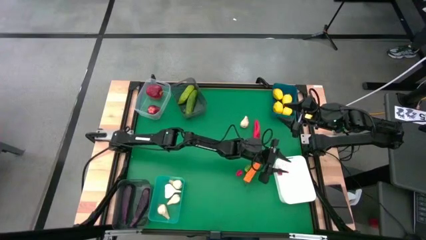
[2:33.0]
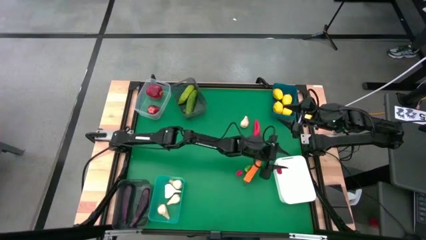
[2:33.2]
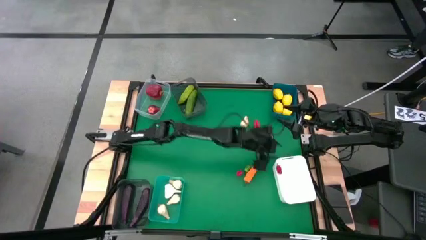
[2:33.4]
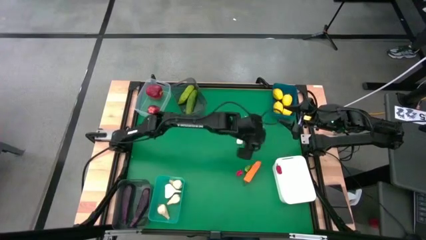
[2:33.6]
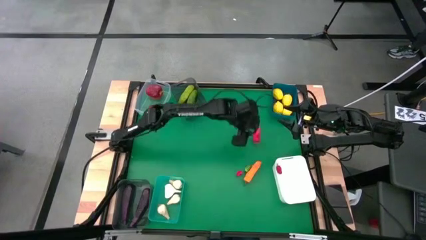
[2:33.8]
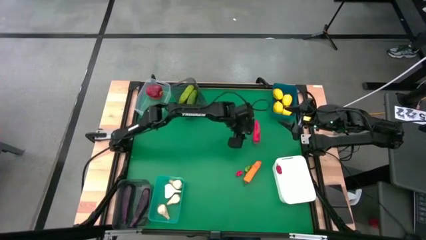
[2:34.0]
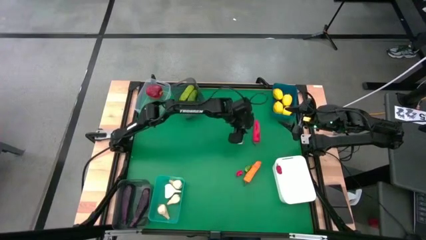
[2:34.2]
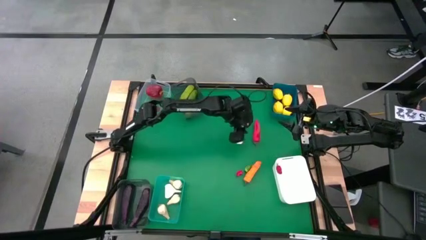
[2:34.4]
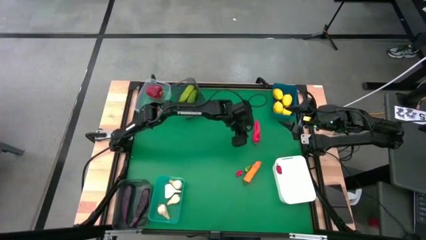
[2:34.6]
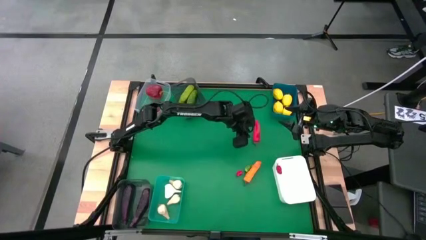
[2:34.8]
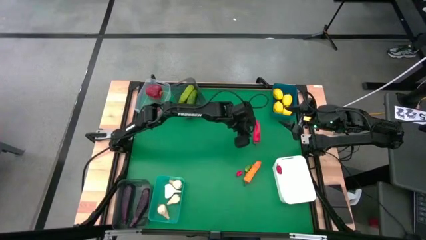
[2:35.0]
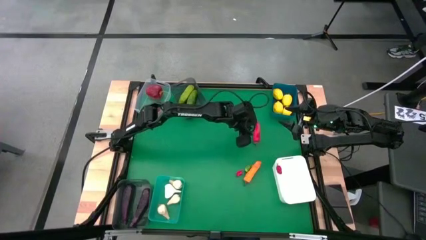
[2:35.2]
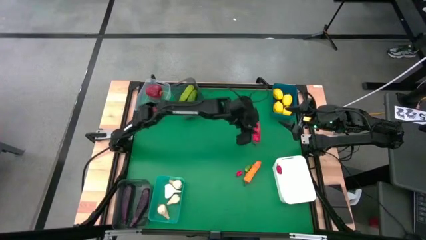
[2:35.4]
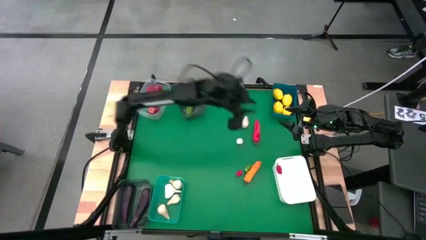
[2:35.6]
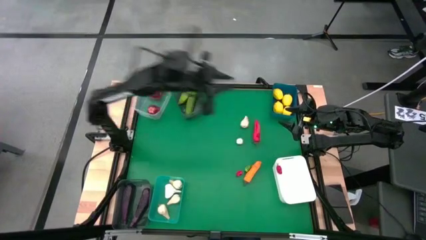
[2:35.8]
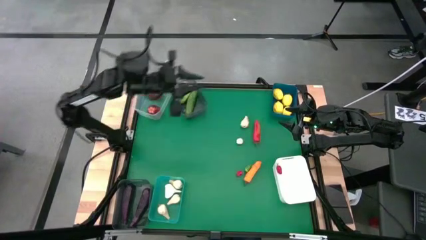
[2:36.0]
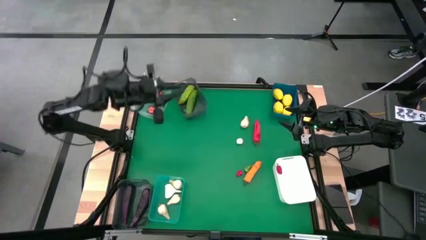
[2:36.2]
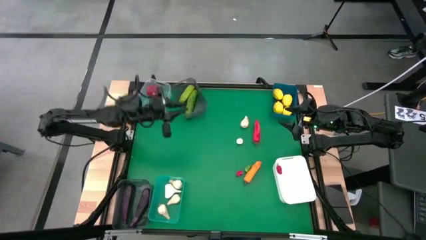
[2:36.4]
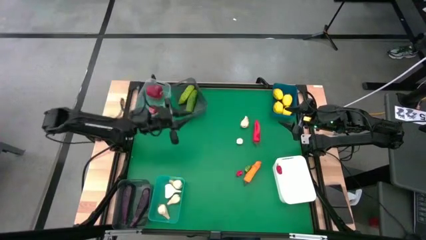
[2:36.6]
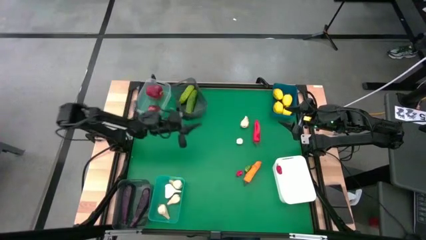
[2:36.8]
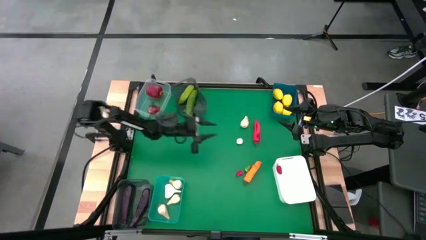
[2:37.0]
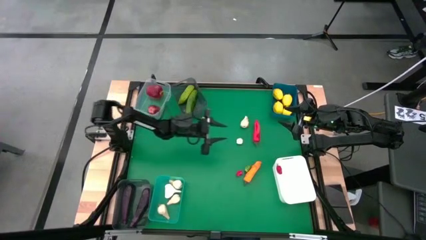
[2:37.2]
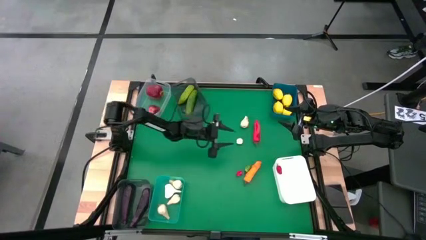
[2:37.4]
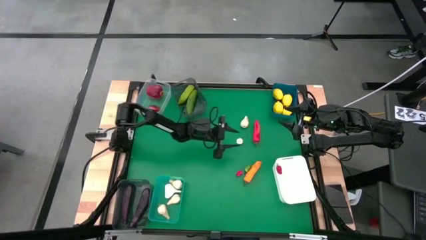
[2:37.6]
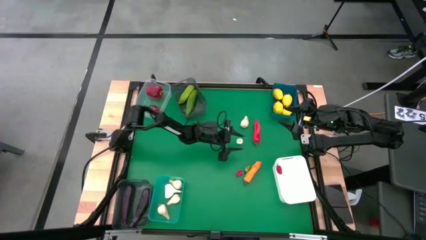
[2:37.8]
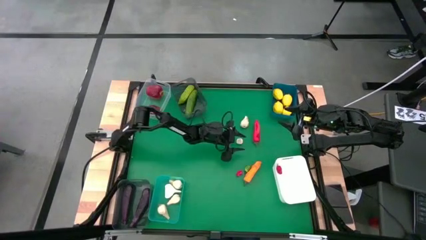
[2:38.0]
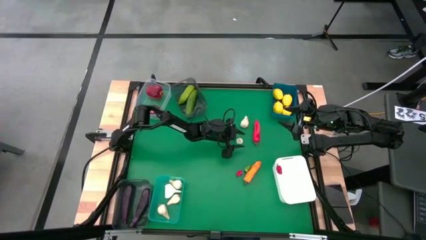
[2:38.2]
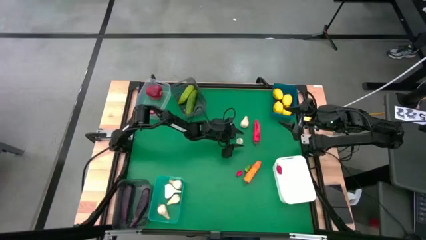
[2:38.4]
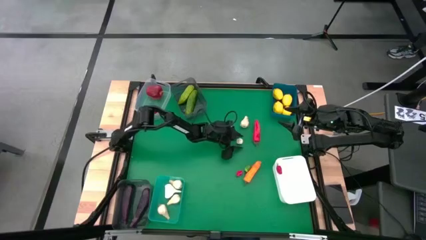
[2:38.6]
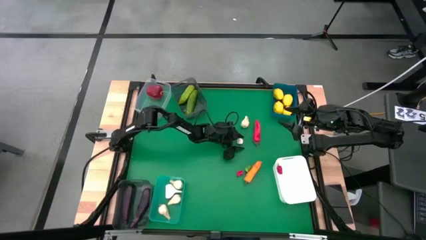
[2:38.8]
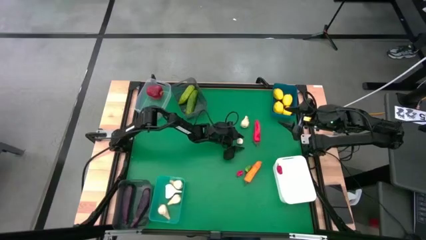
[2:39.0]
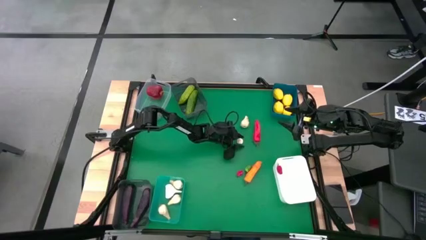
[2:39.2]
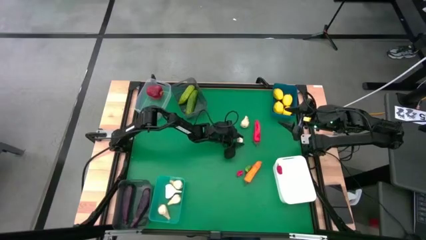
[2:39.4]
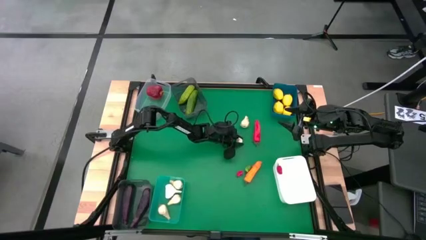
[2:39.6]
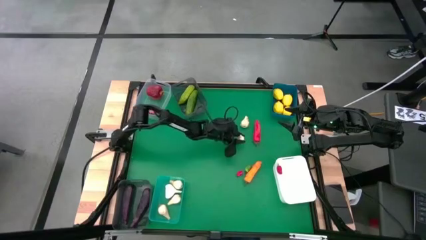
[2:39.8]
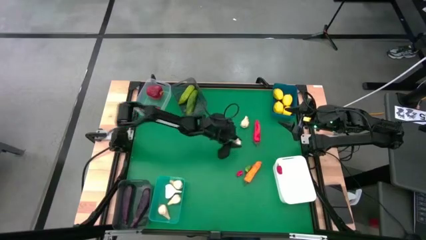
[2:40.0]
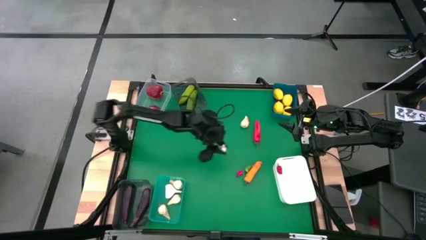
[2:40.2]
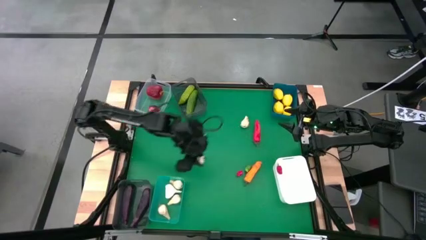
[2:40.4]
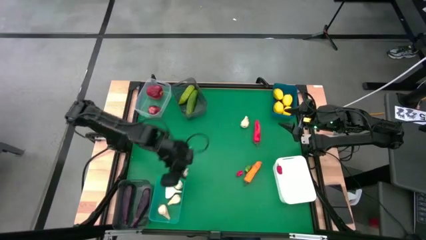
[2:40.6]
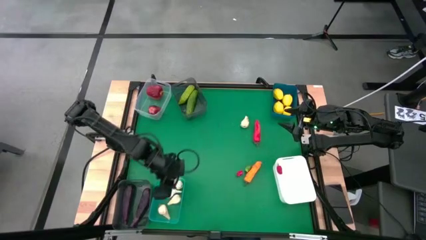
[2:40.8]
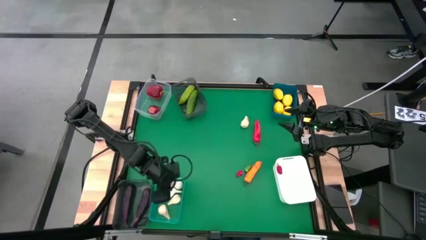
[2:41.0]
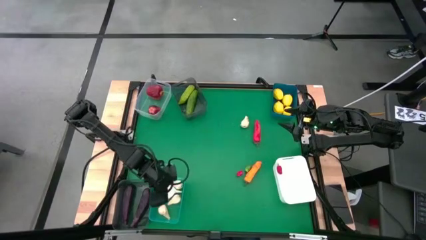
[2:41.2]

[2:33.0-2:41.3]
Task: Sort produce into baskets
Put the garlic into the green bin

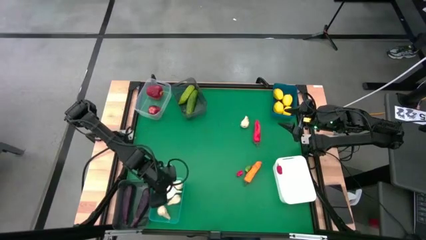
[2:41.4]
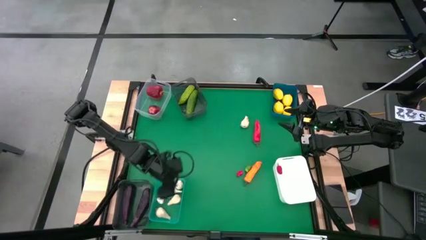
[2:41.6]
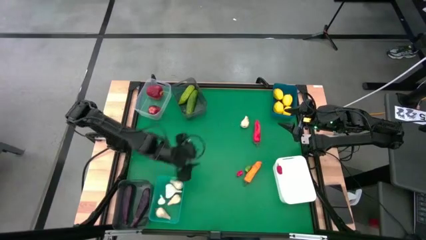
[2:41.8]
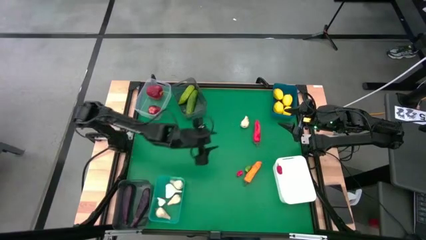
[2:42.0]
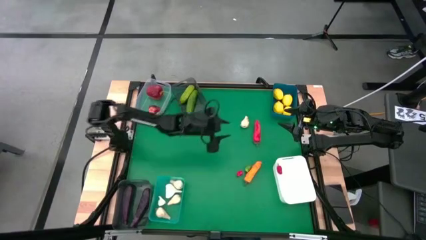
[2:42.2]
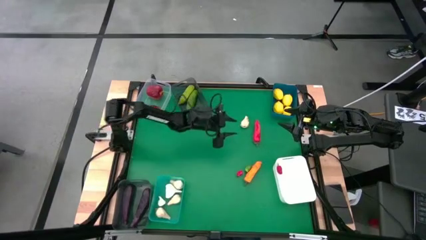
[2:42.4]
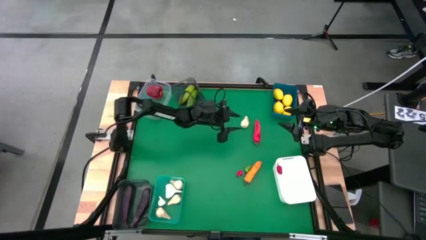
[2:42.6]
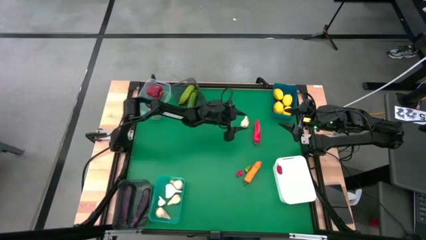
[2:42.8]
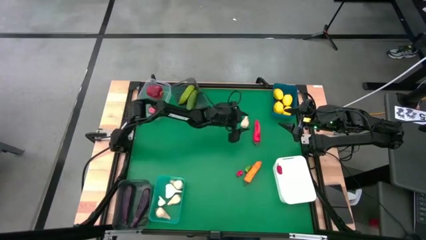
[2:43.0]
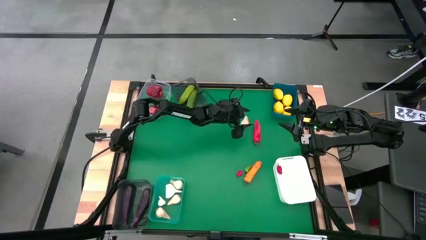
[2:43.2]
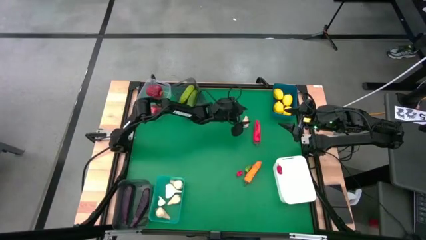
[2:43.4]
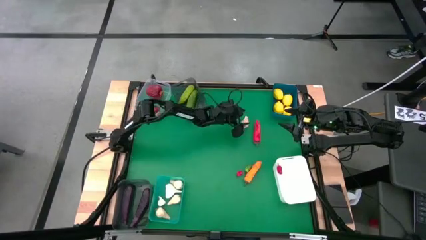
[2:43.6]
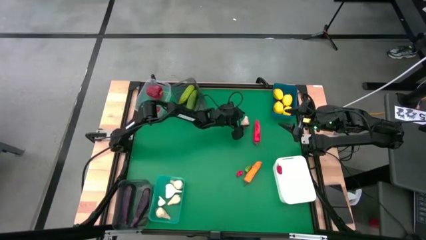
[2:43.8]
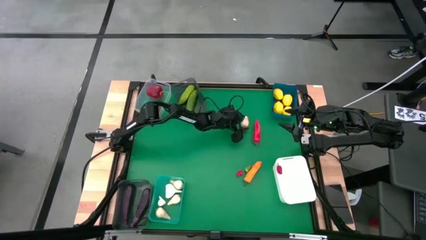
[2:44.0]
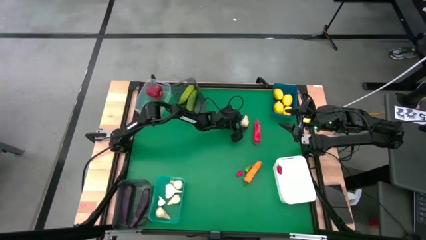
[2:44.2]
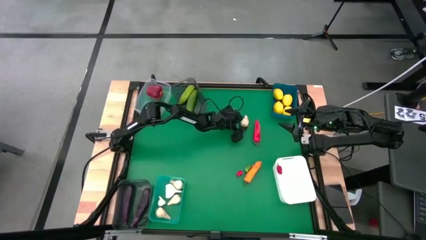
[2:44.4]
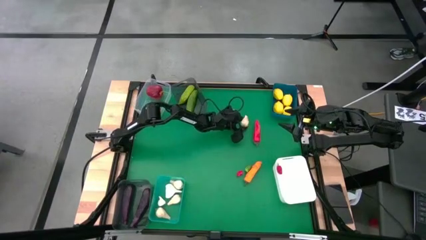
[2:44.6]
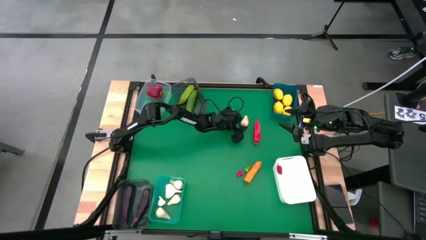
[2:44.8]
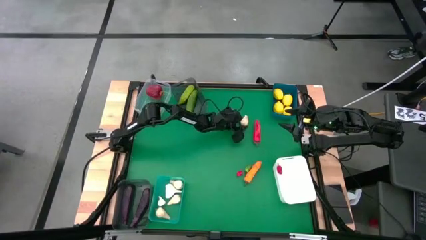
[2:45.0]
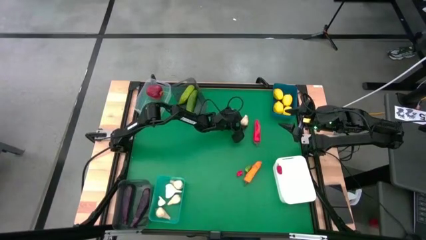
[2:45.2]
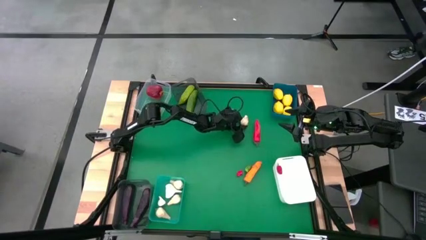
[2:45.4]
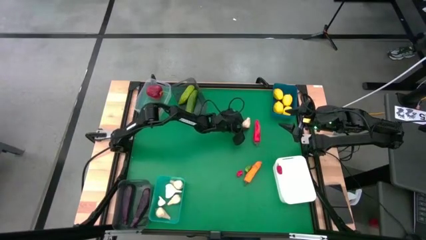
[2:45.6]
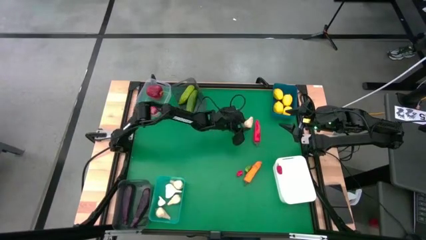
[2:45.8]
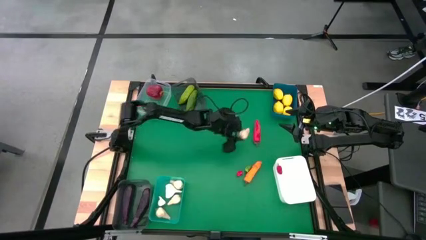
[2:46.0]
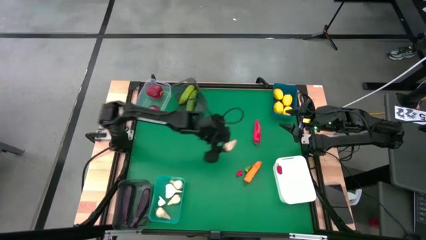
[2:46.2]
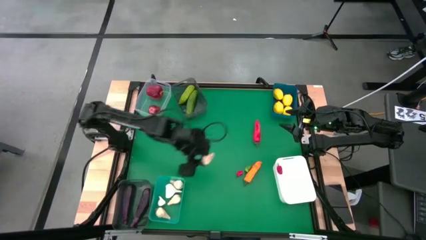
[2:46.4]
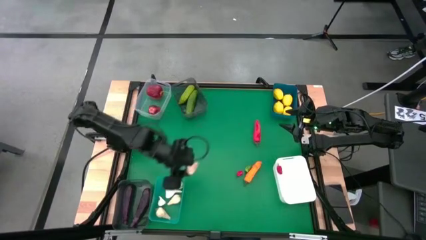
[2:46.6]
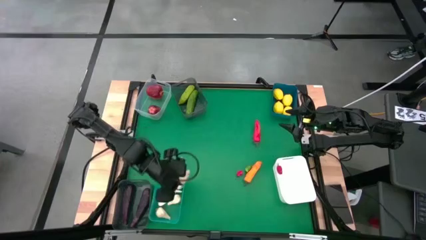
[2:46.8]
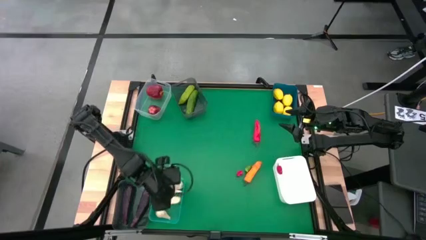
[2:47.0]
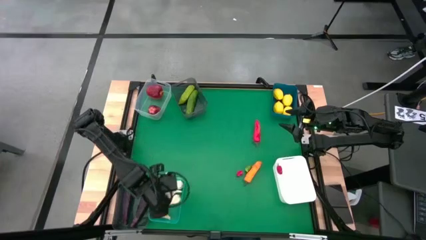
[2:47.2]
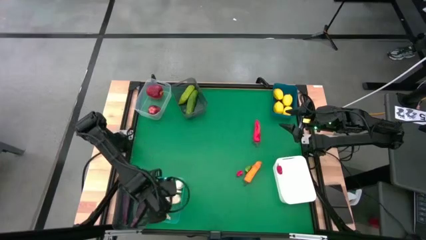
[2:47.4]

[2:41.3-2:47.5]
Put the garlic into the green bin

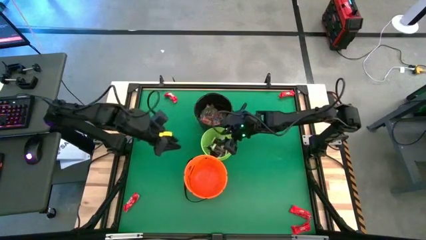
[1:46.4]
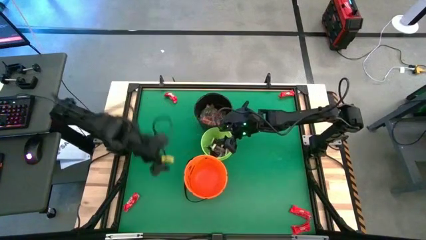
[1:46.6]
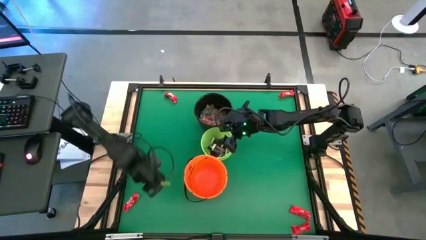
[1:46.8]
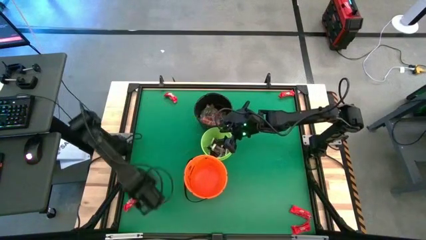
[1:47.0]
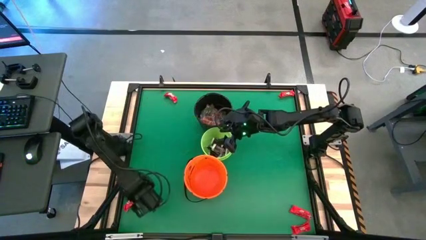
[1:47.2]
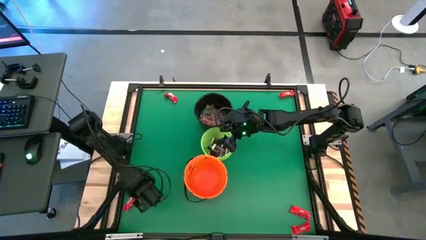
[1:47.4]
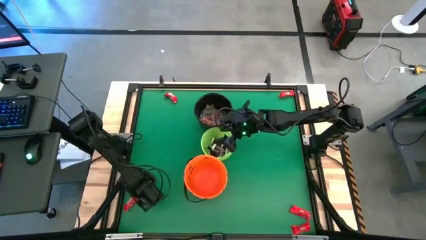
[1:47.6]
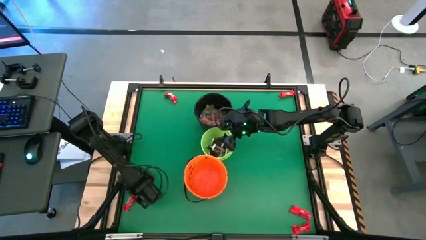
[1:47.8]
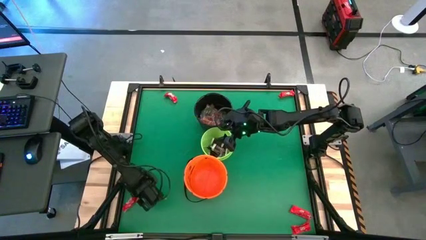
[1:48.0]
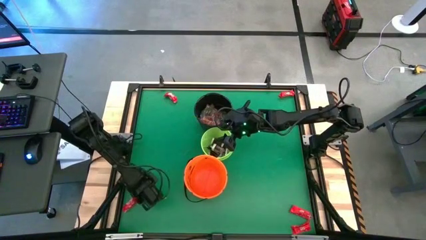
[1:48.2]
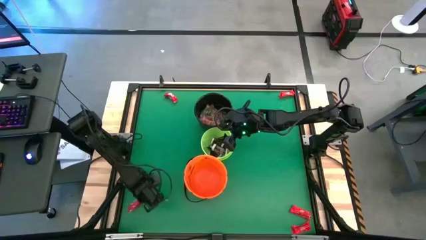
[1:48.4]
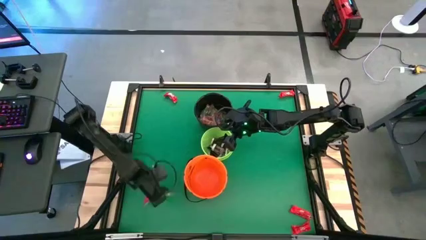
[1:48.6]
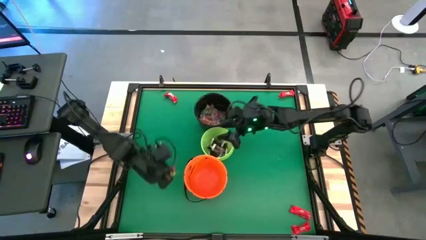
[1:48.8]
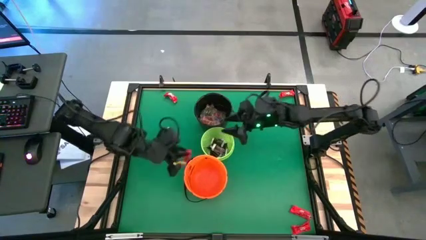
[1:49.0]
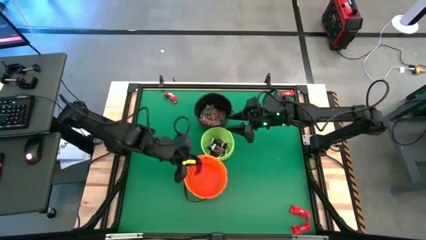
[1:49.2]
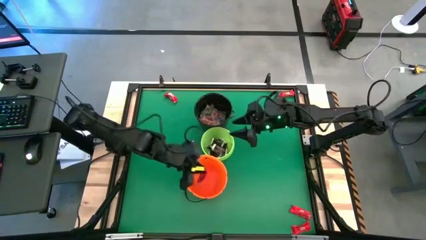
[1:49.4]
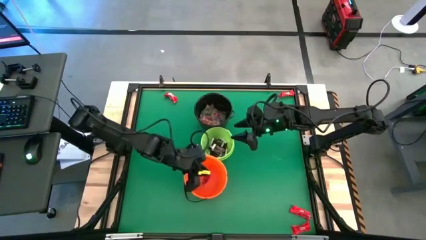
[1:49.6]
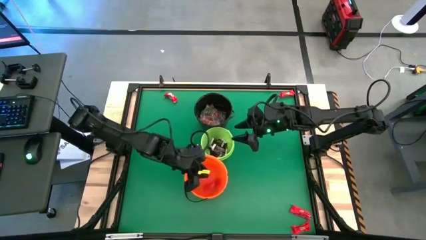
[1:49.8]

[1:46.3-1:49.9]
Task: Sort candy by brand, put in halloween buckets
Put the red chocolate bar into the orange bucket
